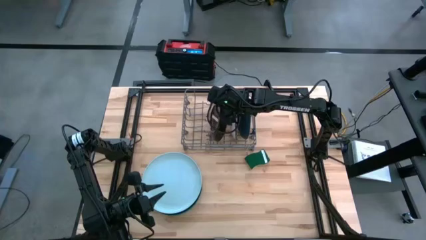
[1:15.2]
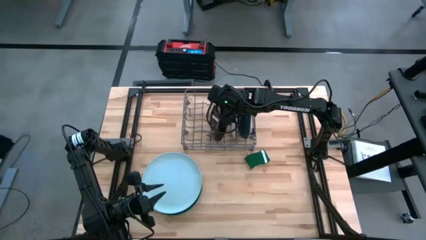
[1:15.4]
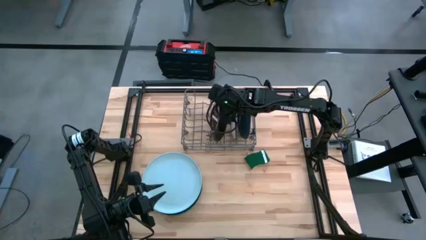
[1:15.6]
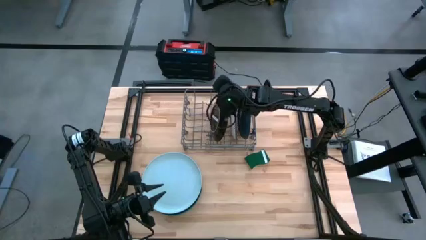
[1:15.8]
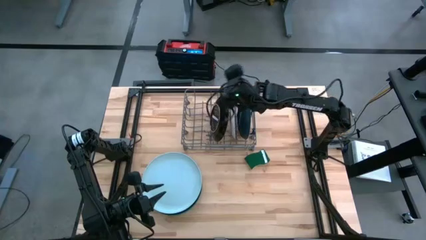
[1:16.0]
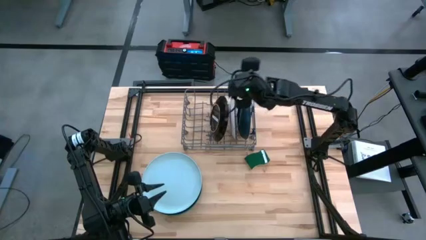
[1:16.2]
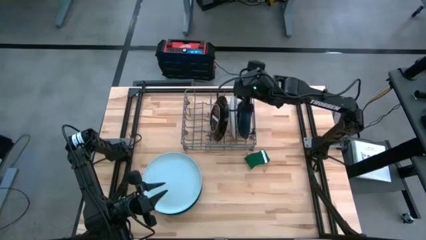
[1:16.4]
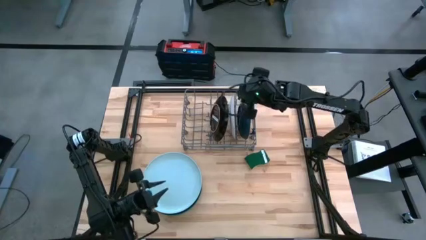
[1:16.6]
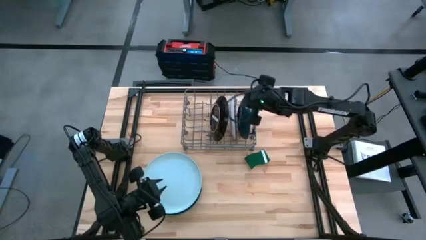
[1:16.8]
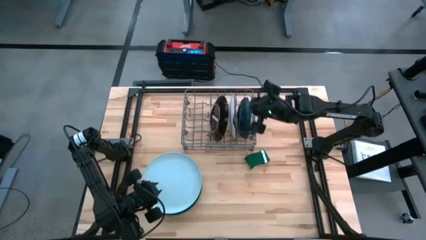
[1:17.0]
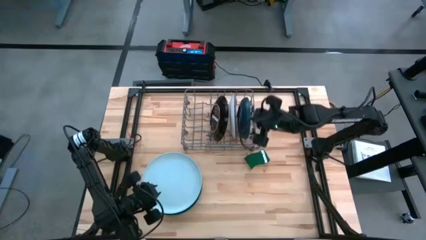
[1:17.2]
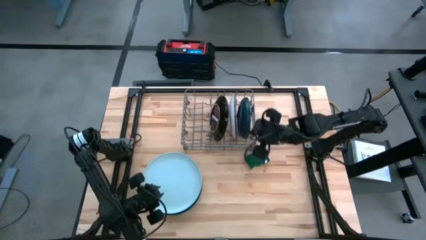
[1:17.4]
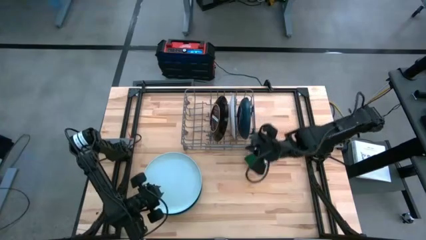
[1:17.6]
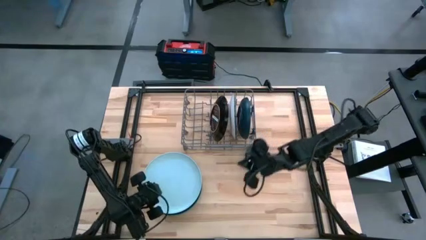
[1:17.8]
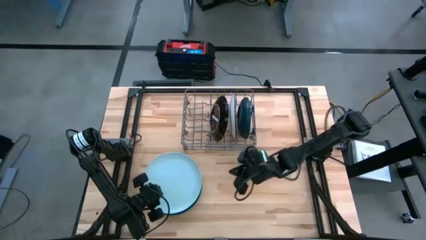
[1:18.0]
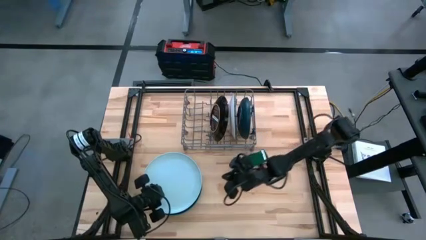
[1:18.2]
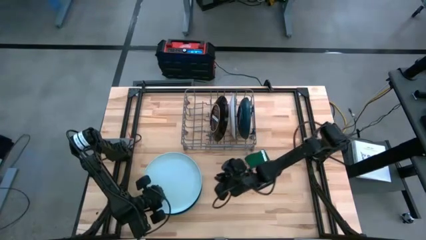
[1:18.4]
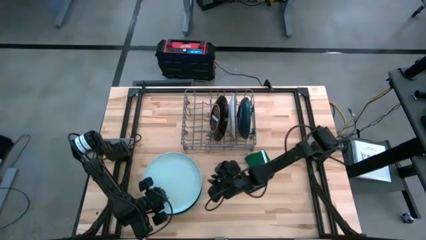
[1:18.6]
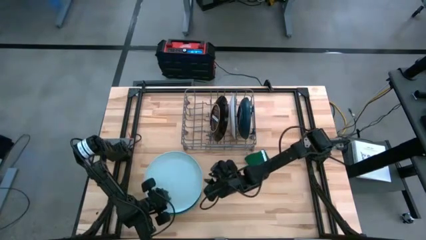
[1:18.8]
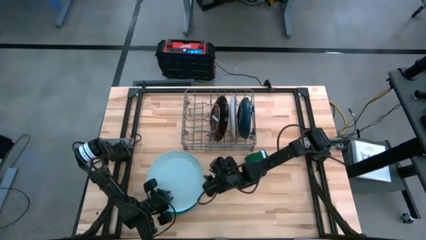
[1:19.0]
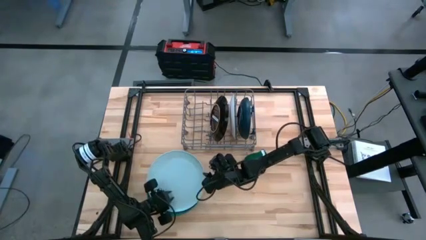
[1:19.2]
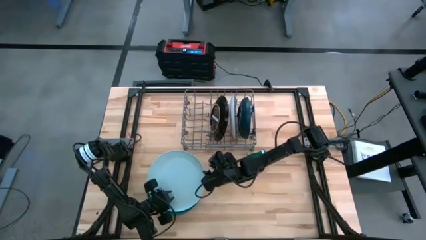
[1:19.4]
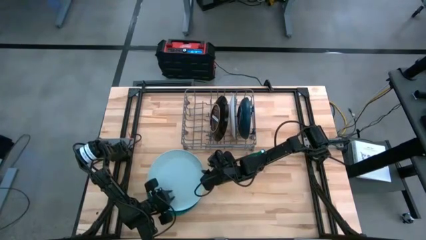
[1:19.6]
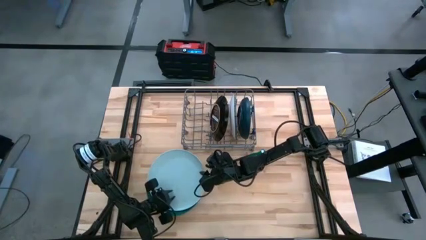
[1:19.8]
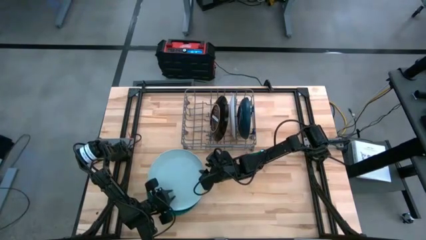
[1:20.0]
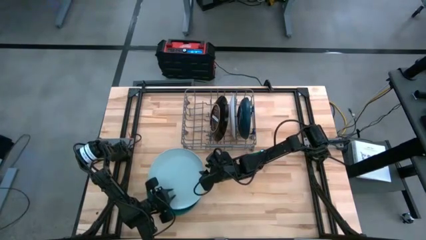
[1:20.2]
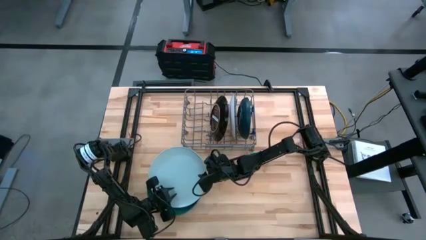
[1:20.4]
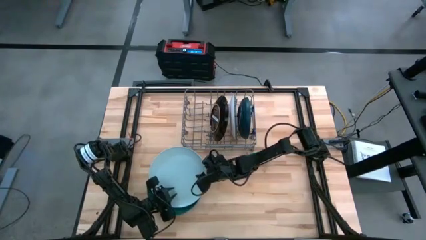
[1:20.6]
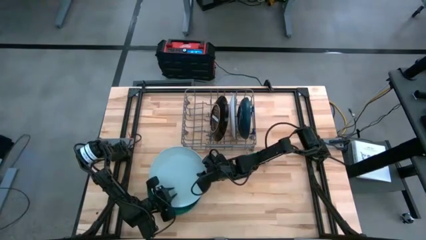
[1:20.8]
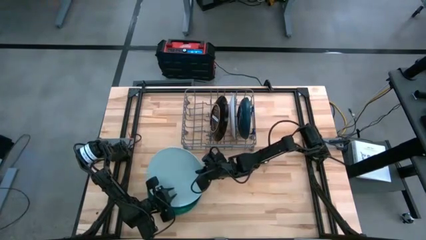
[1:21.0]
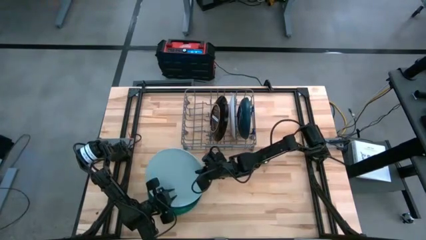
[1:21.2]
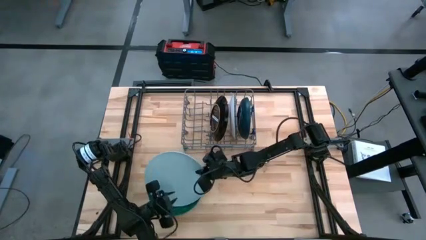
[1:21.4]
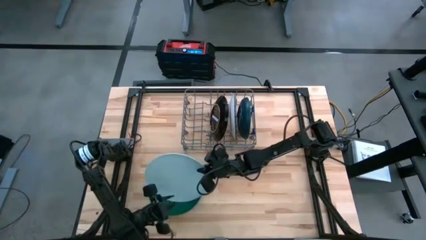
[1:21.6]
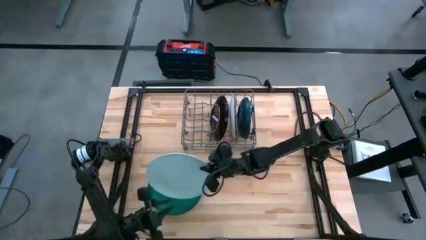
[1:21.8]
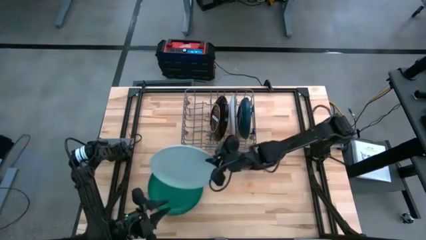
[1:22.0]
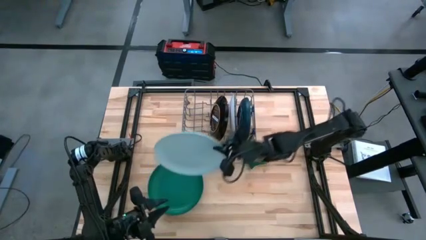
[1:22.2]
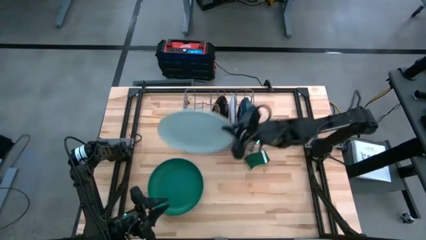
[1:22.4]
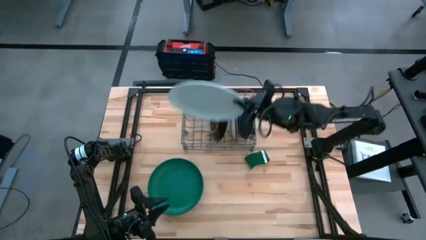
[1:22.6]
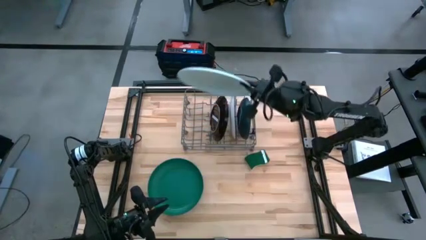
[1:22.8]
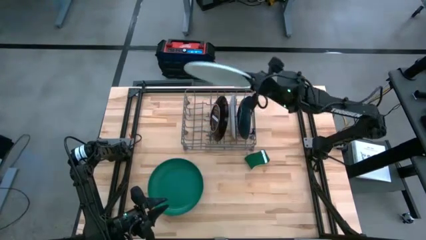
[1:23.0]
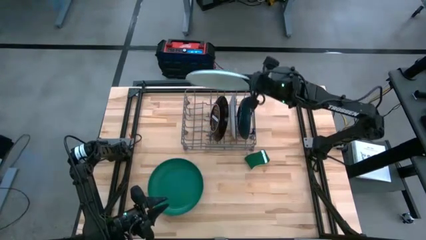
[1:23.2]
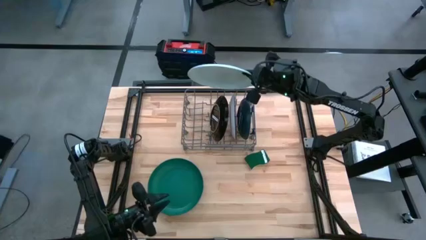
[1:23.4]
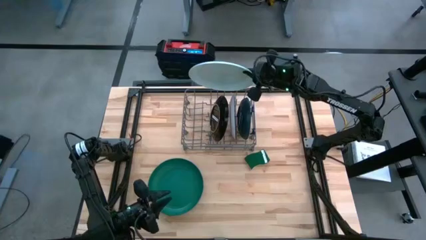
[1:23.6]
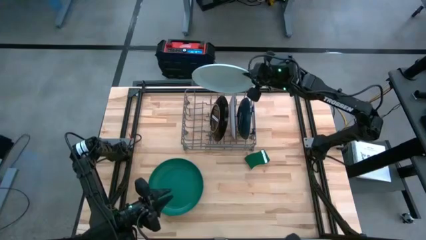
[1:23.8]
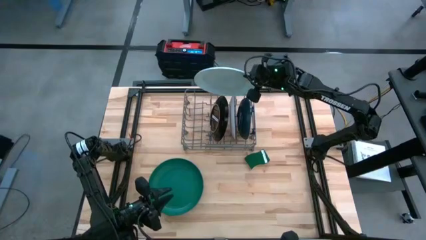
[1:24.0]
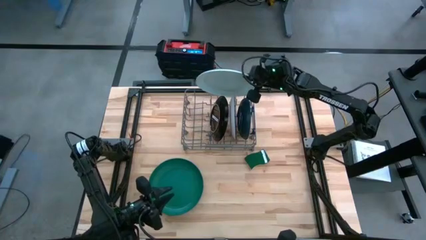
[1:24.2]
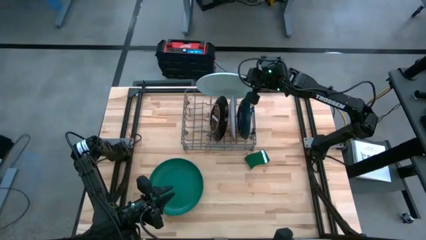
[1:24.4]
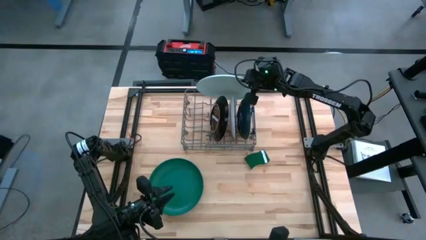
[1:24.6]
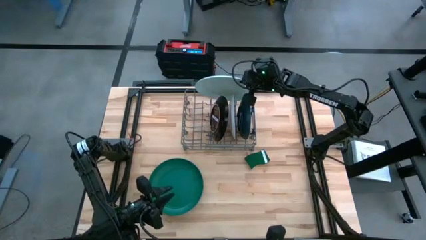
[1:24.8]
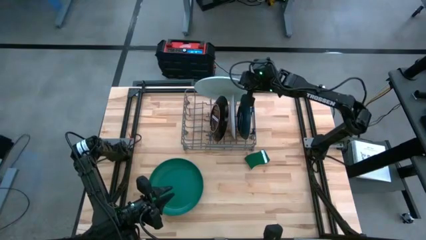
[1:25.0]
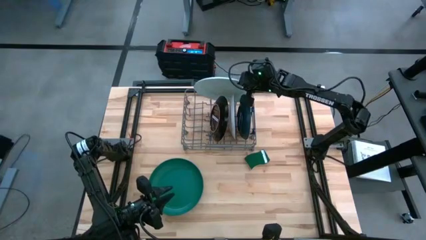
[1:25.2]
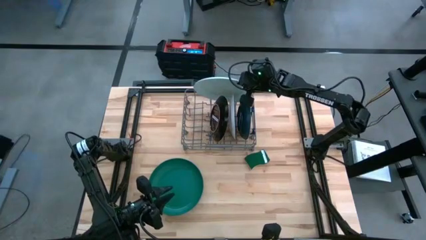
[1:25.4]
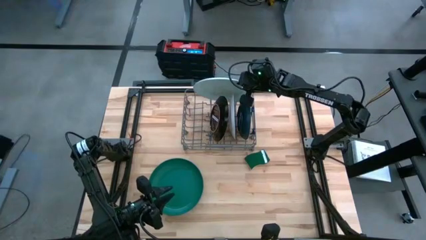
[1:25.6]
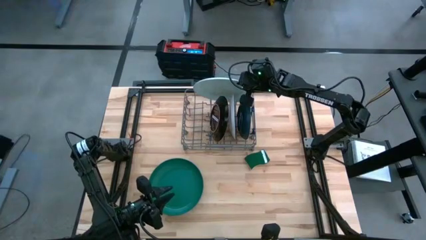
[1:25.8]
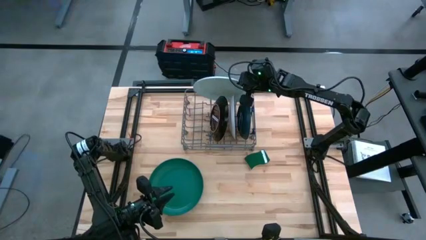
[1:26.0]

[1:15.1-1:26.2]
Task: Sort dishes
Put the white plate into the dish rack

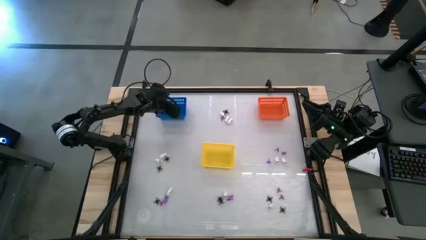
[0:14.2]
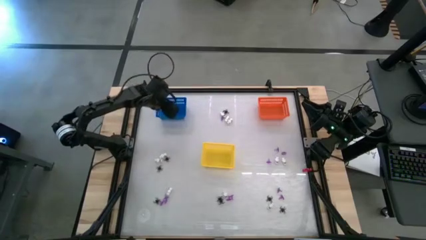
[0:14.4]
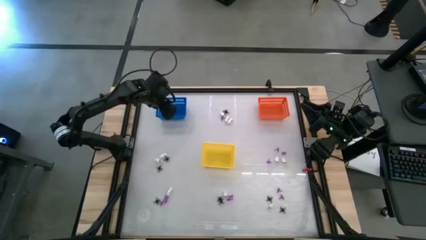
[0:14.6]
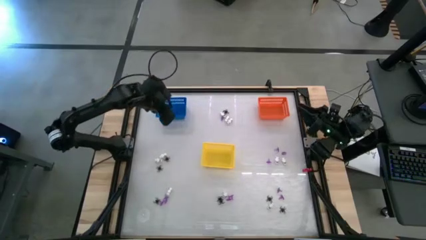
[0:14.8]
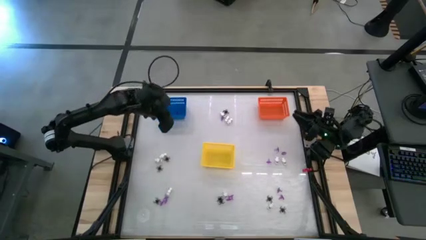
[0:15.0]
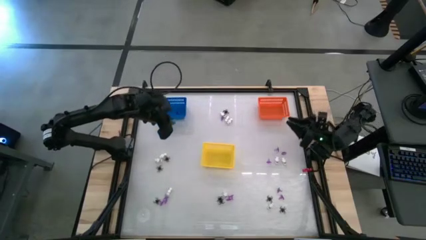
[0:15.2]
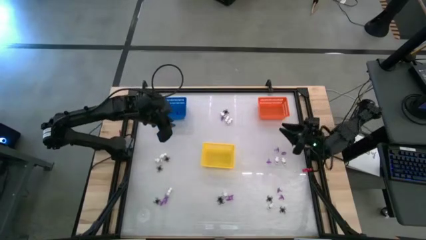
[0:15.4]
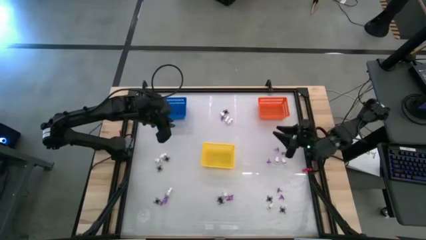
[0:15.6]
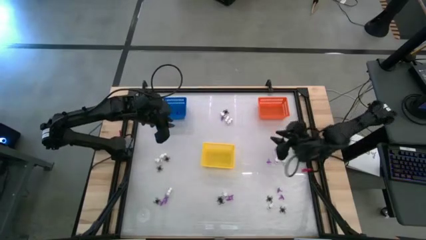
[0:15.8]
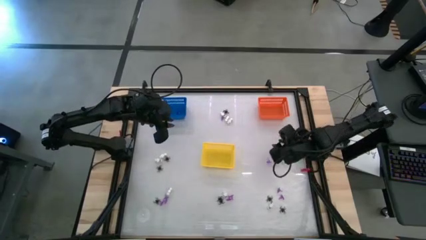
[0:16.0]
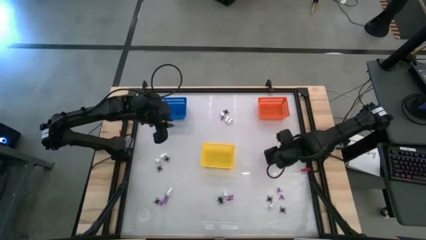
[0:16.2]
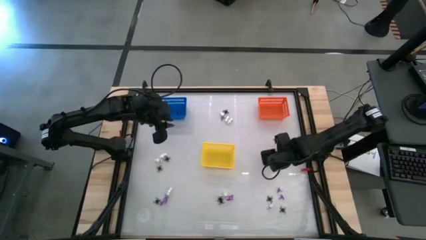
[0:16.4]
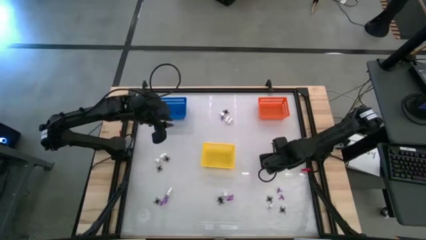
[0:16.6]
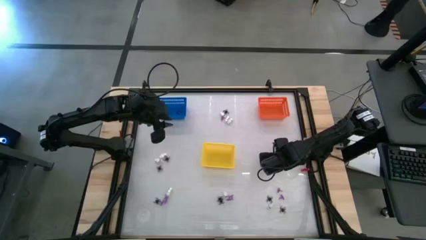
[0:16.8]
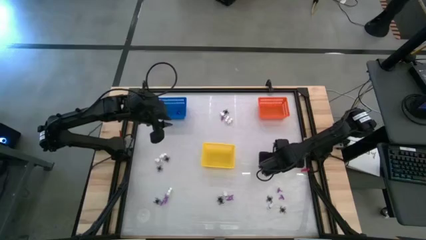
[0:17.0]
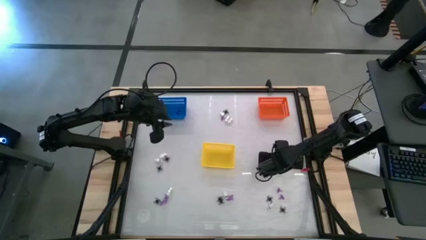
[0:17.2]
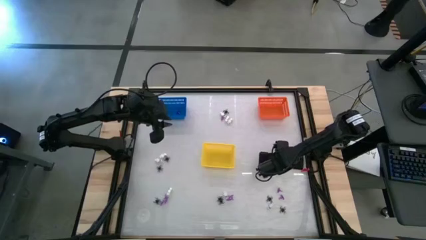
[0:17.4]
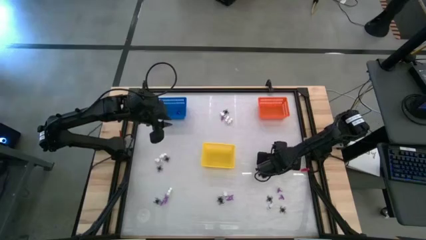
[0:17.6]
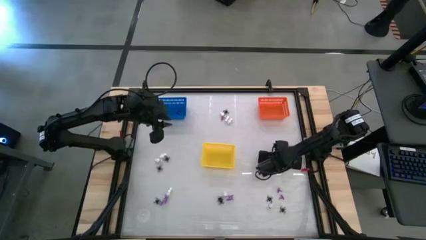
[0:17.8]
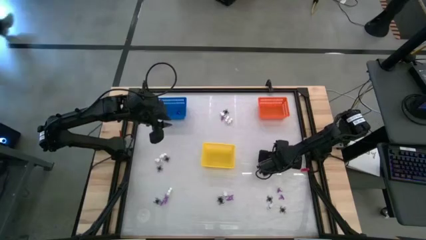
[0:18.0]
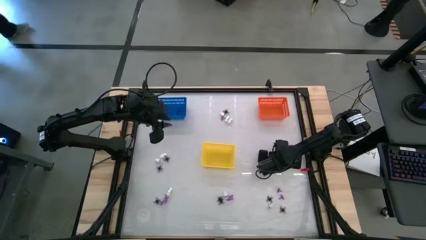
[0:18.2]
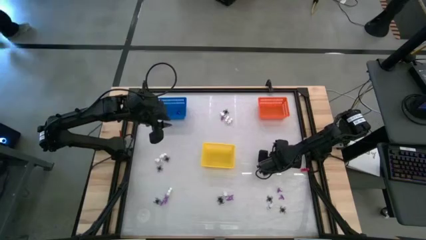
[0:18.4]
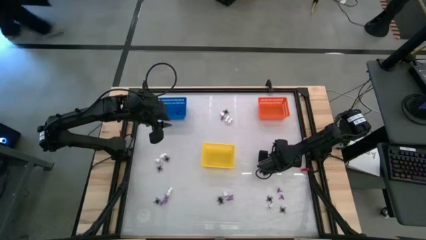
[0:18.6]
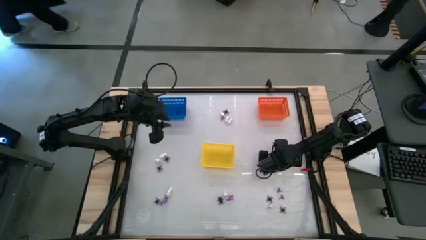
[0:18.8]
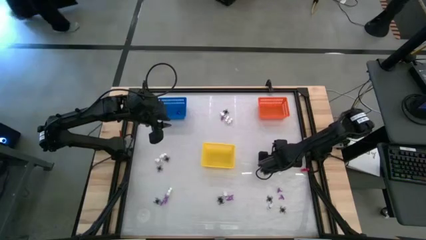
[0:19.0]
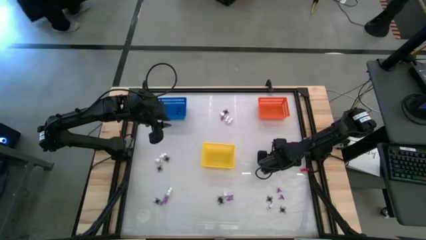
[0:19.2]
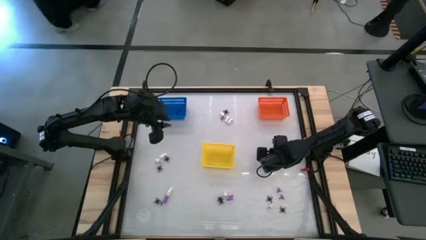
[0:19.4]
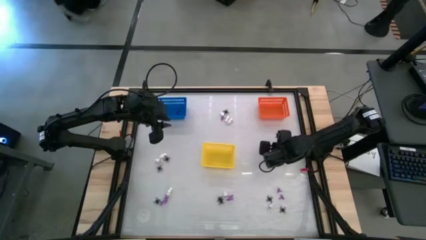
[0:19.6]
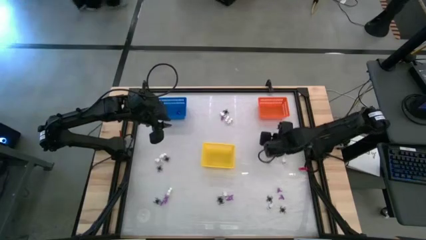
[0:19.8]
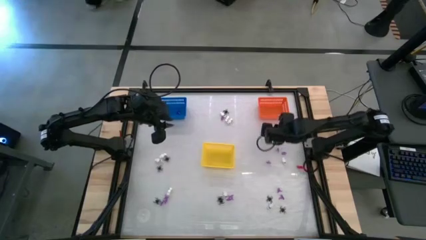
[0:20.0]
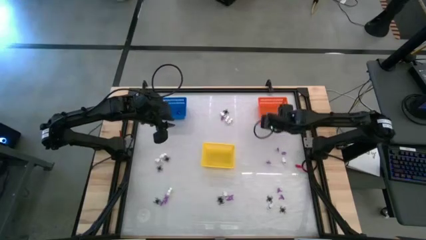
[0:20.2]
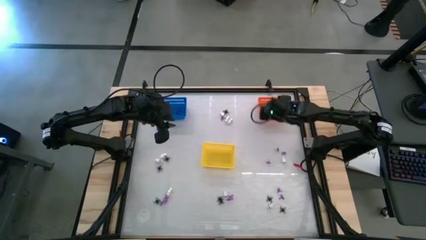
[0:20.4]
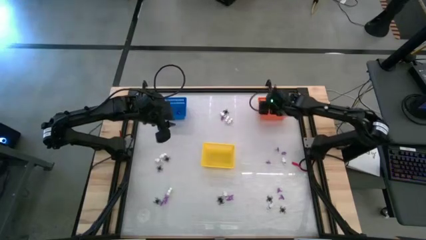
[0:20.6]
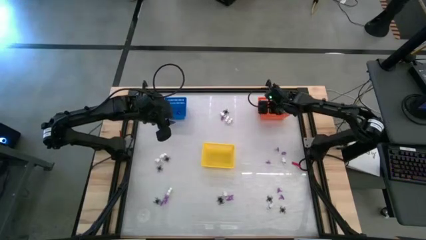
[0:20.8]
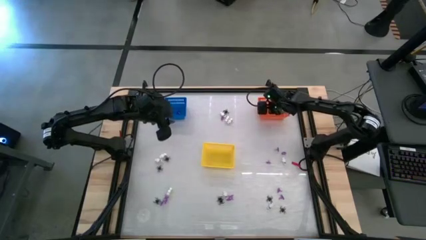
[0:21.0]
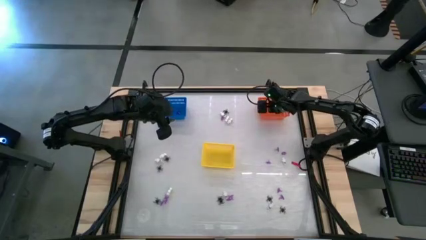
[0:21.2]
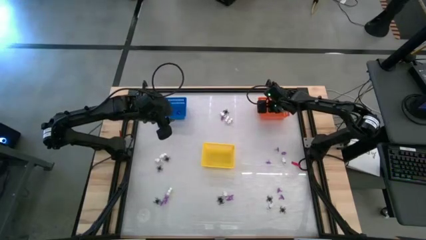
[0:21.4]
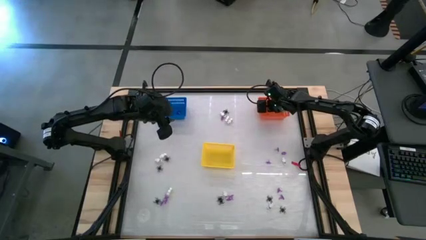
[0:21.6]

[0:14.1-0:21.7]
Task: Sort Halloween decoration
Put the white skeleton toy into the orange bin
